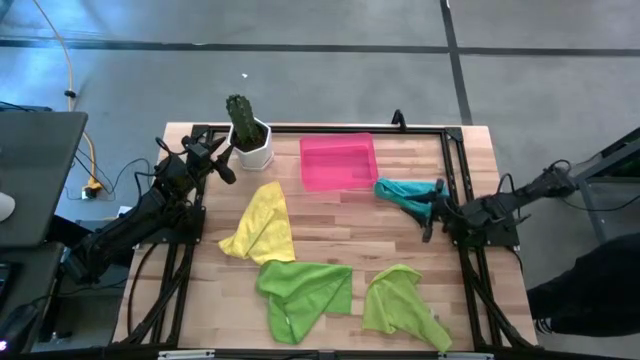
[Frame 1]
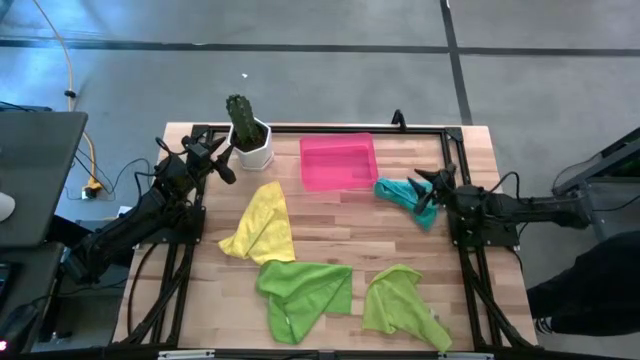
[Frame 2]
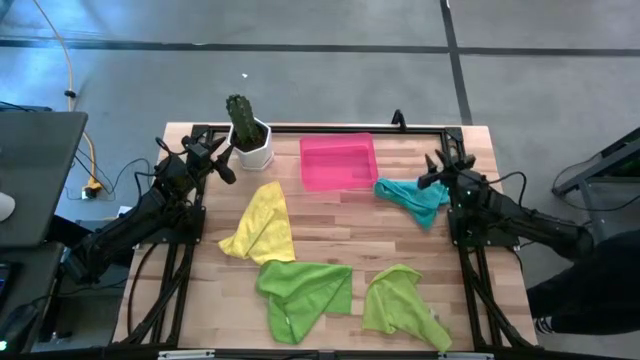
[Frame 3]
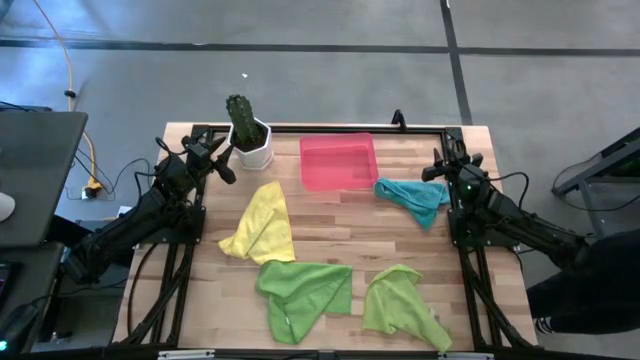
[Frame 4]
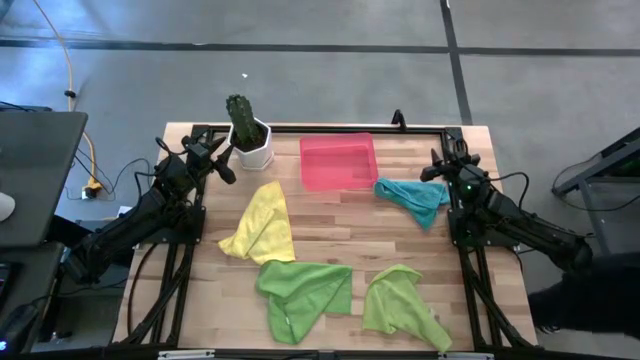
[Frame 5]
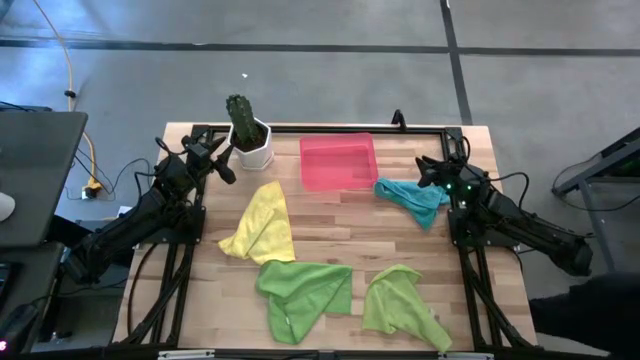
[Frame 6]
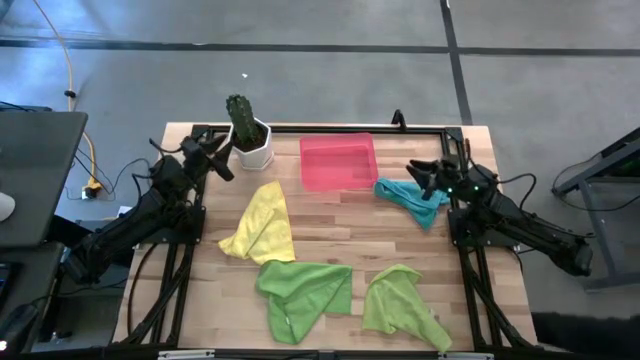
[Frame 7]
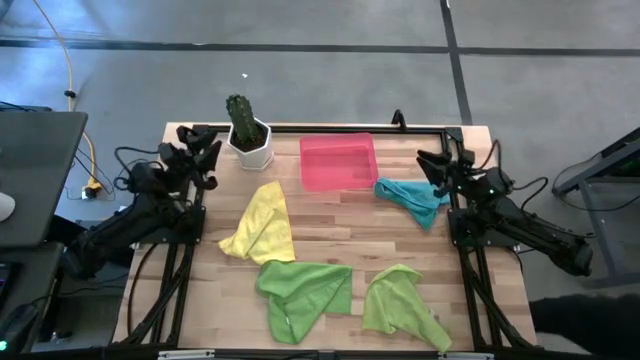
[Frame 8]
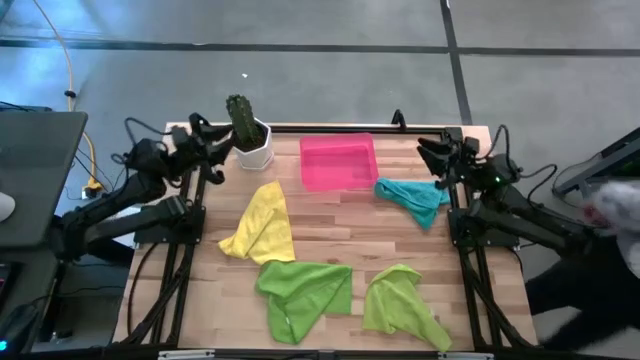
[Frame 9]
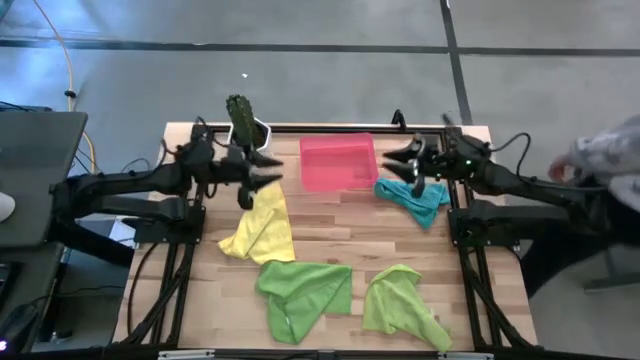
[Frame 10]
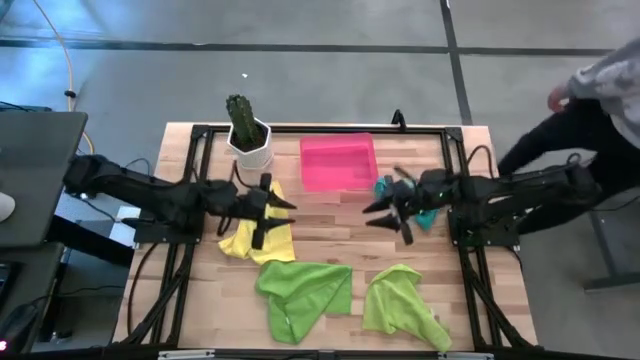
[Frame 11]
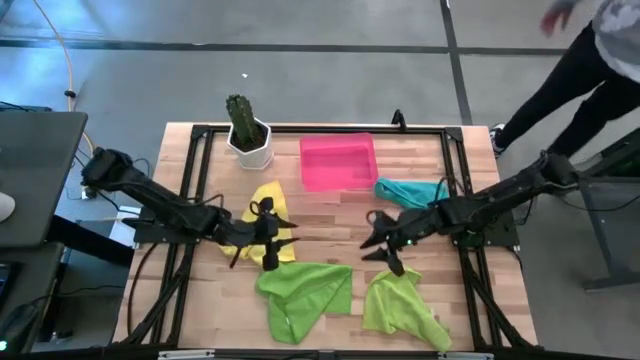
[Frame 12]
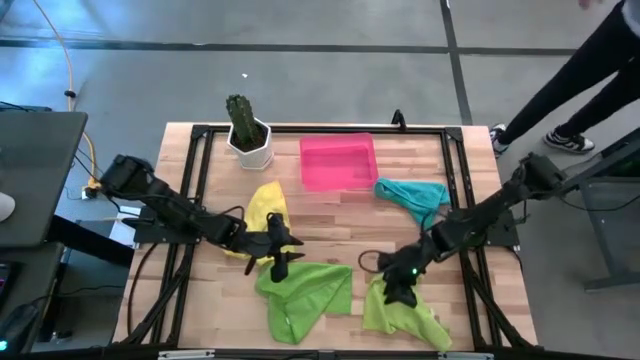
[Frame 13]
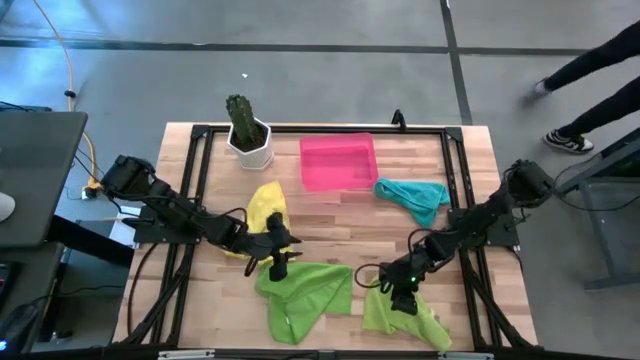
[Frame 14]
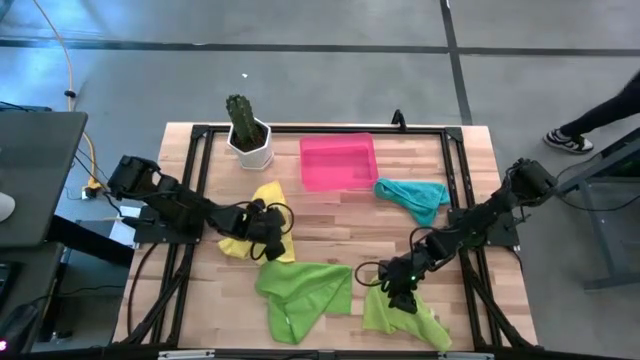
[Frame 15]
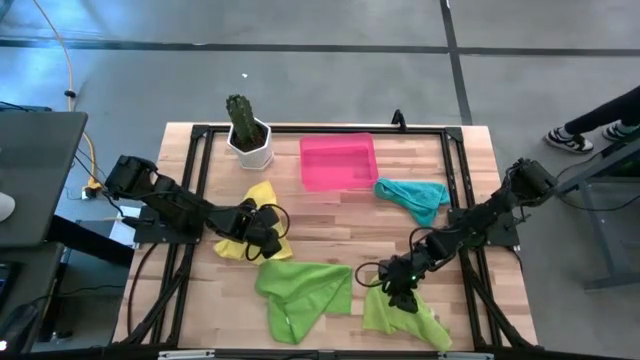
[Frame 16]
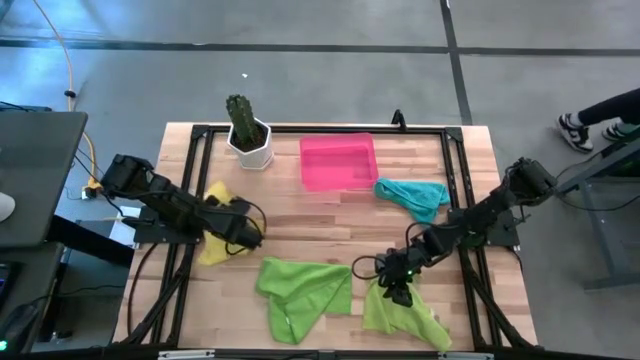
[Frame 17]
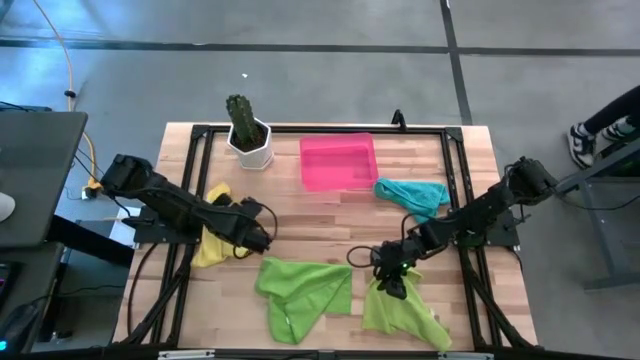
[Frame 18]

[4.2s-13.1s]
Task: Roll microfiber towels into tight, uniform cylinder then place into a basket
Move the yellow microfiber cloth to the middle left of the table

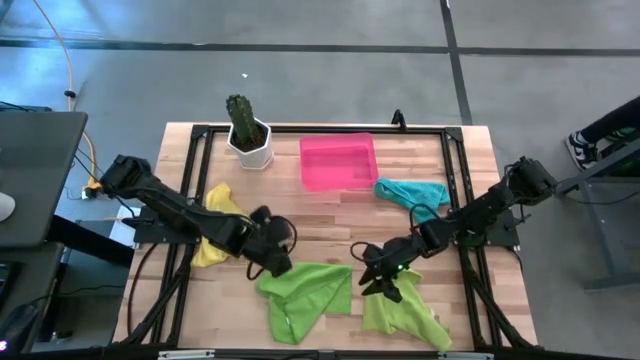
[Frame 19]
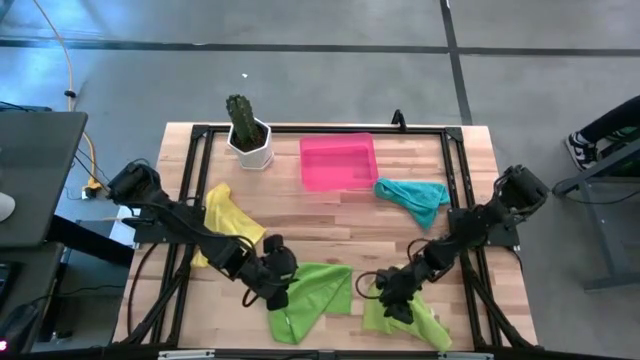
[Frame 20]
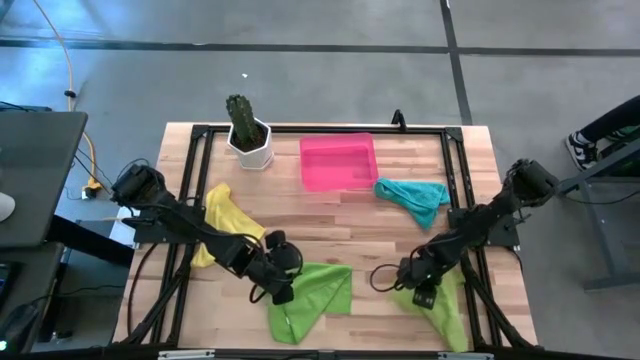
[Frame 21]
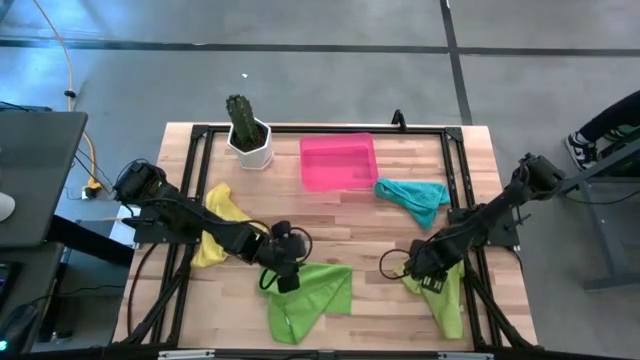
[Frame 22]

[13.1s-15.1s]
Move the light green microfiber cloth to the middle left of the table

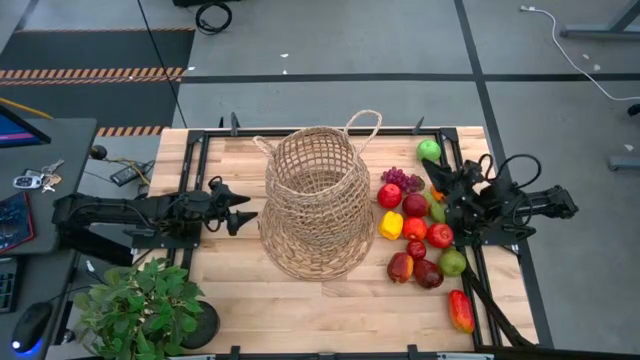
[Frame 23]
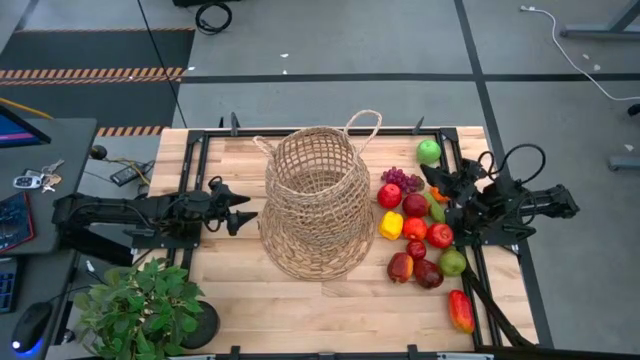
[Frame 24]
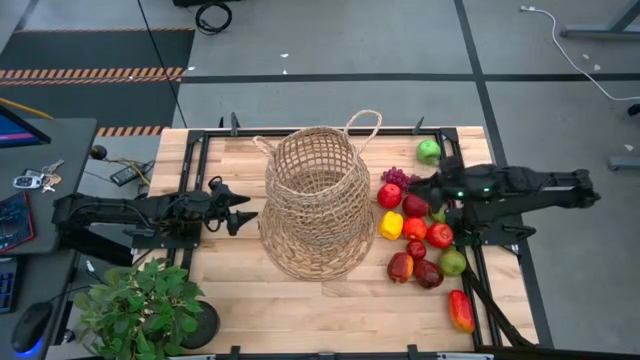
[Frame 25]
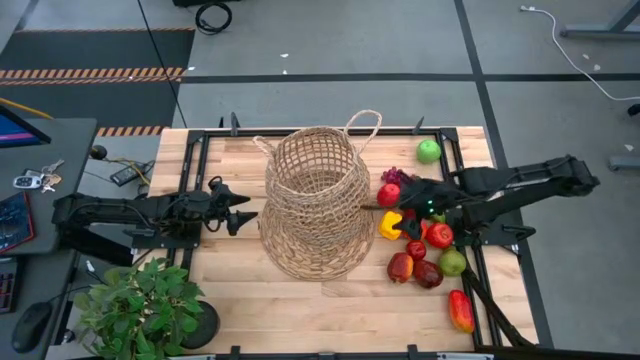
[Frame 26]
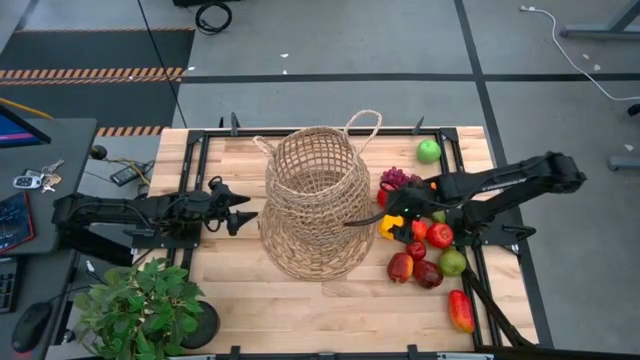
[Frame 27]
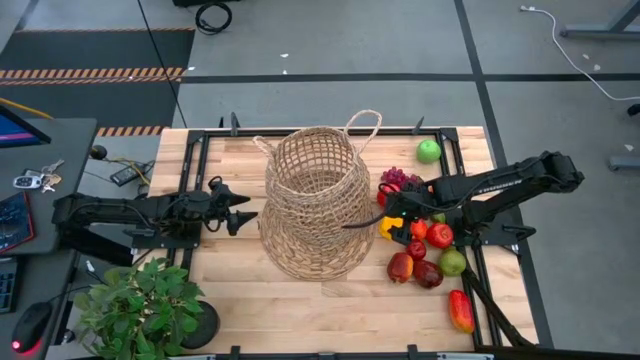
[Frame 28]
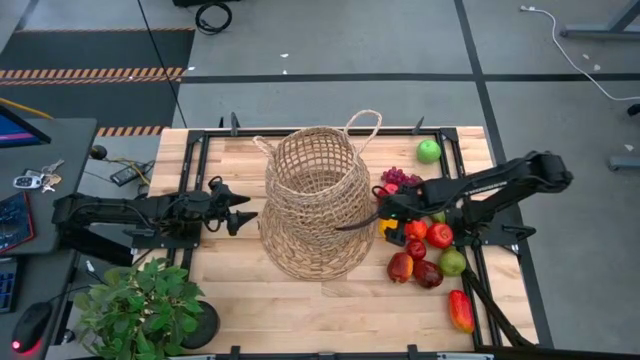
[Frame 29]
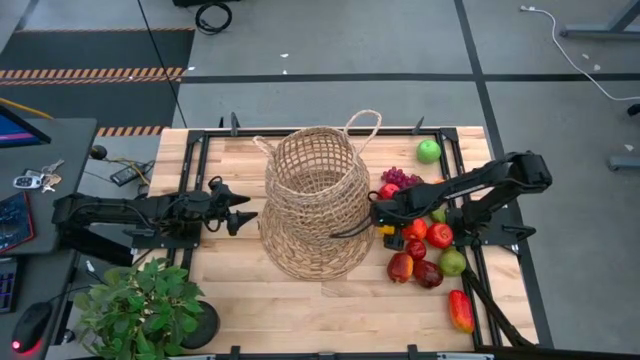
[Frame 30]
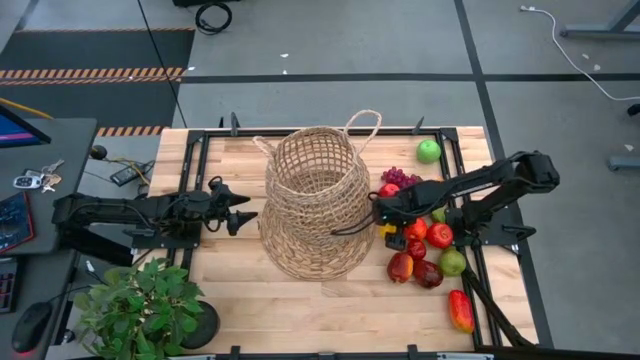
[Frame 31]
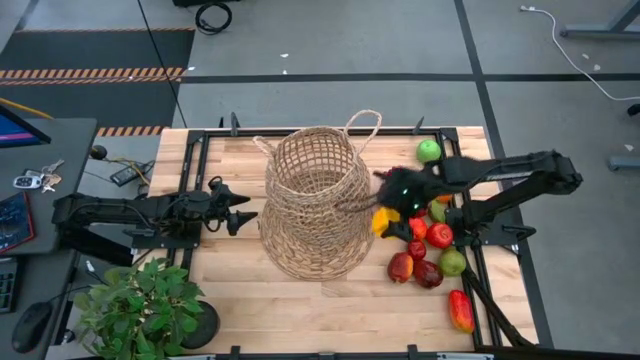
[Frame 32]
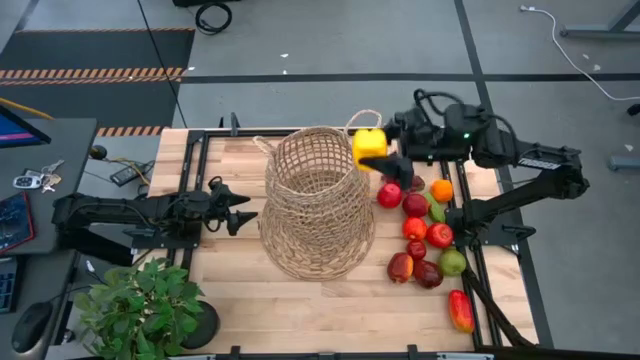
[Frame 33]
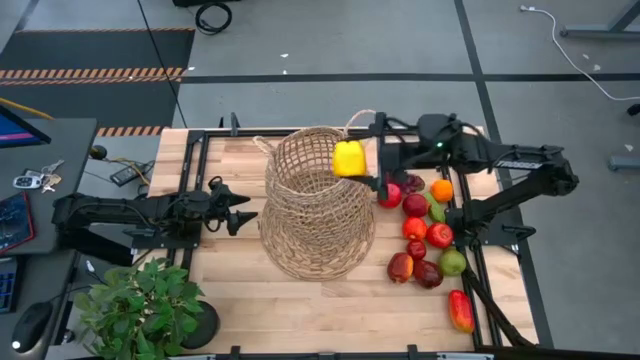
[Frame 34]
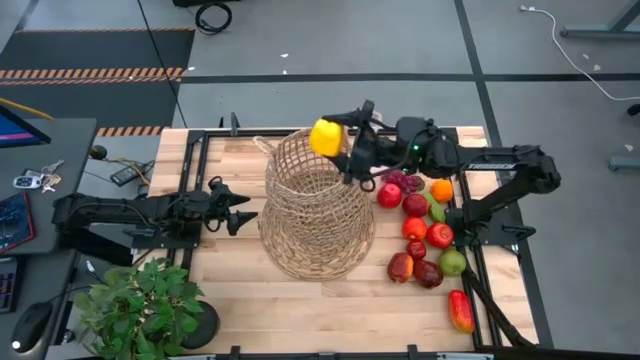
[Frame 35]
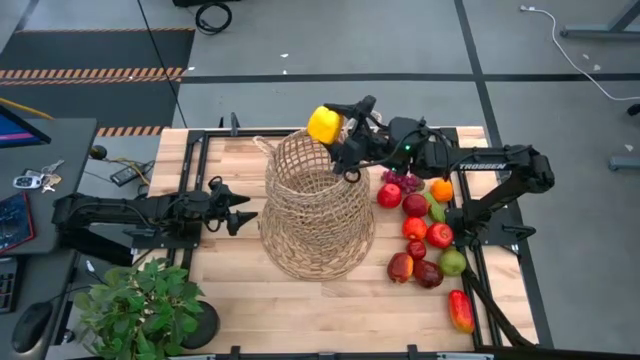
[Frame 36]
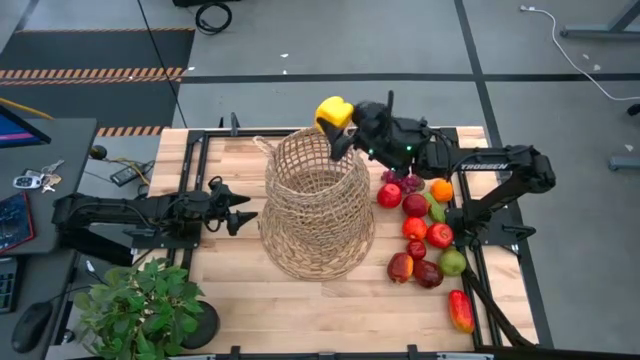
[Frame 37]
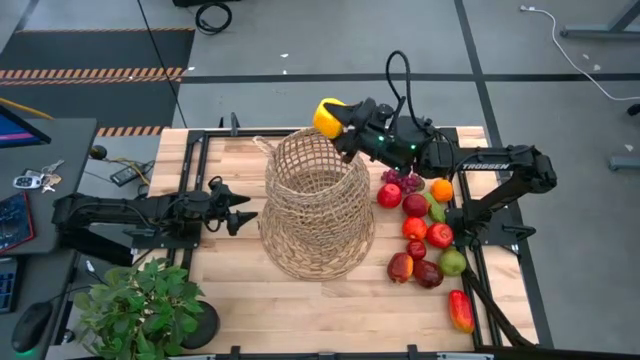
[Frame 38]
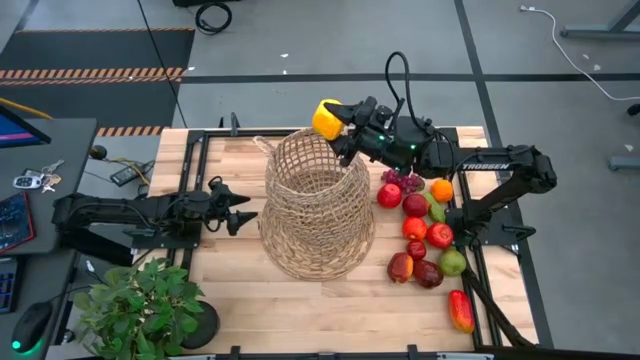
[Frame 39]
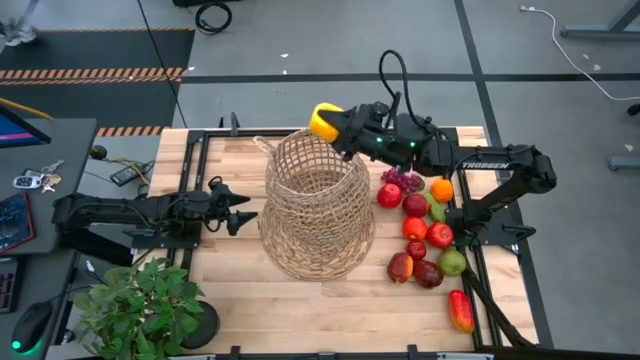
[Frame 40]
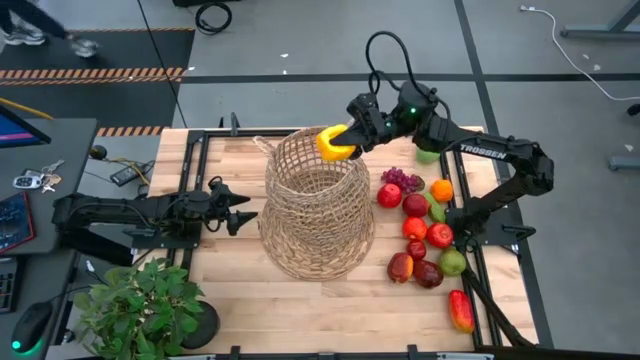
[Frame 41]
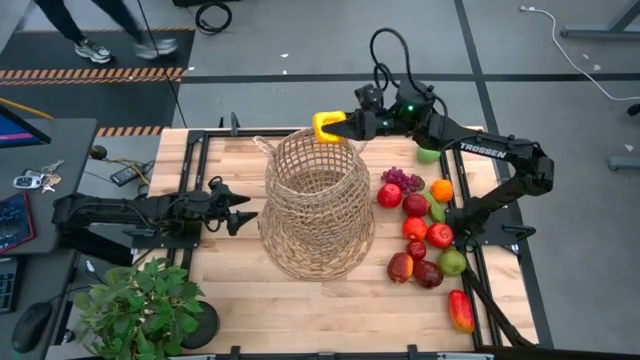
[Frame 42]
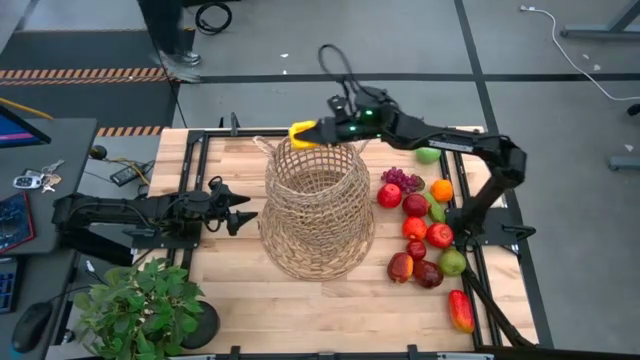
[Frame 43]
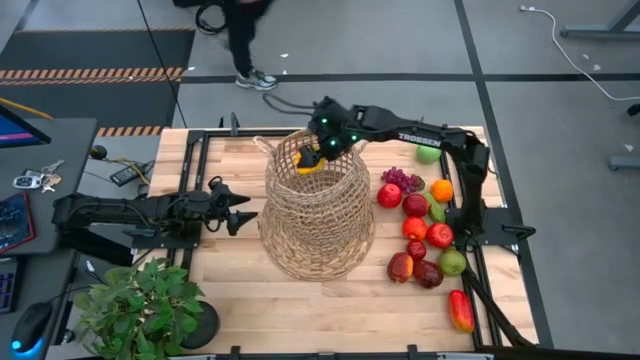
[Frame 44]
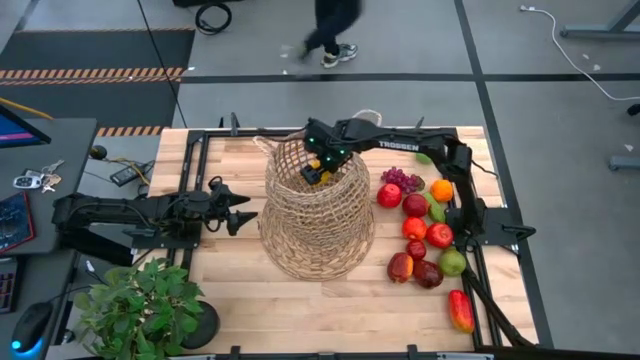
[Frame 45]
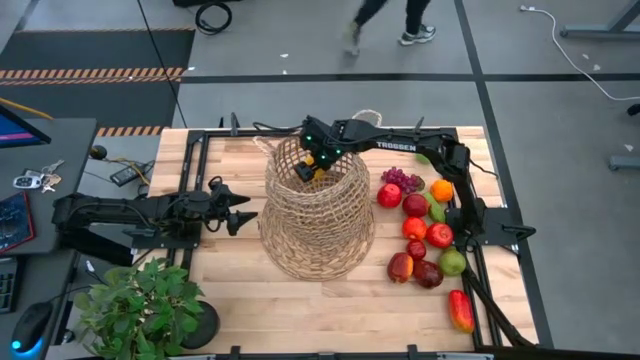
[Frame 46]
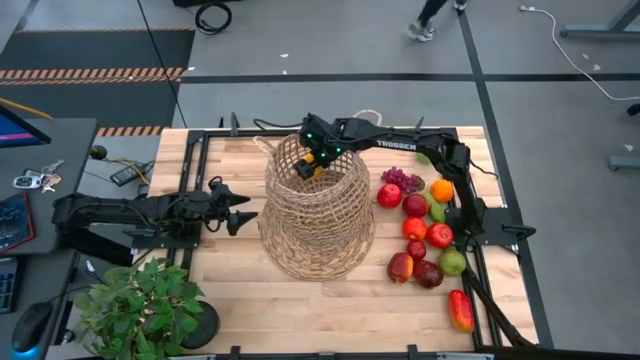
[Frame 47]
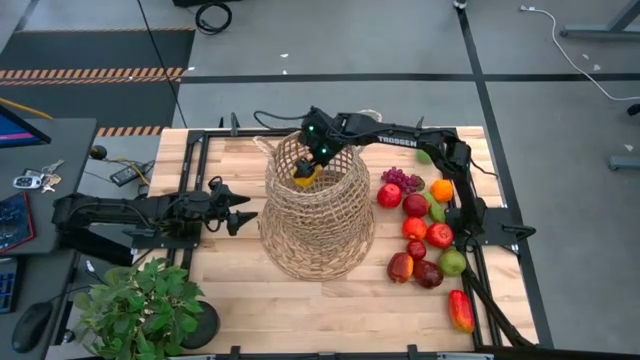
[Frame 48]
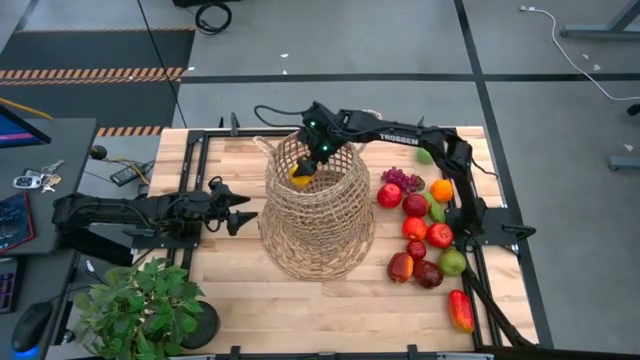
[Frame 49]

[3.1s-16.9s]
Task: Build produce basket
Put the bell pepper into the brown basket
